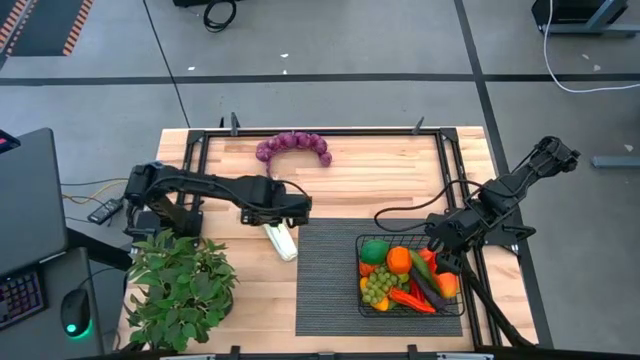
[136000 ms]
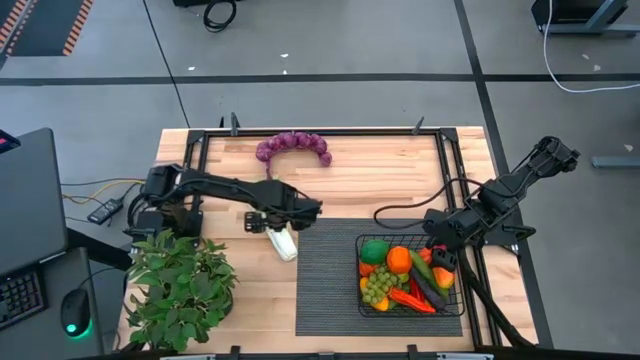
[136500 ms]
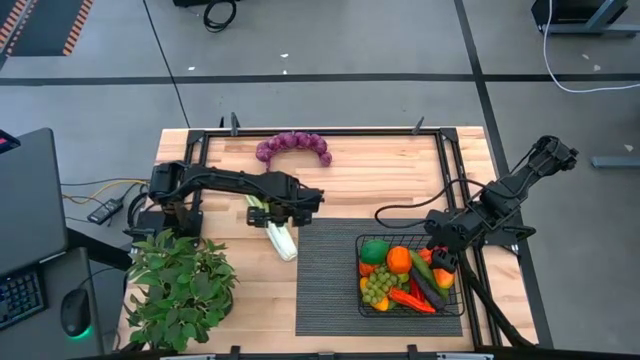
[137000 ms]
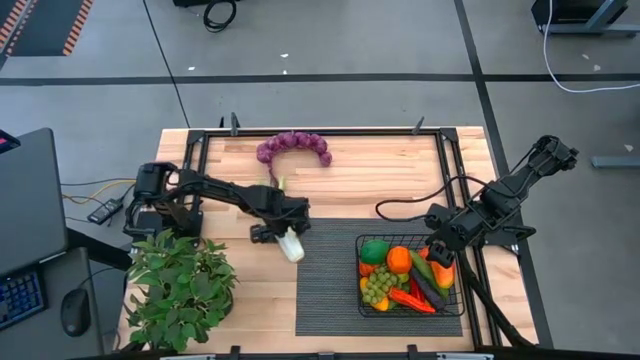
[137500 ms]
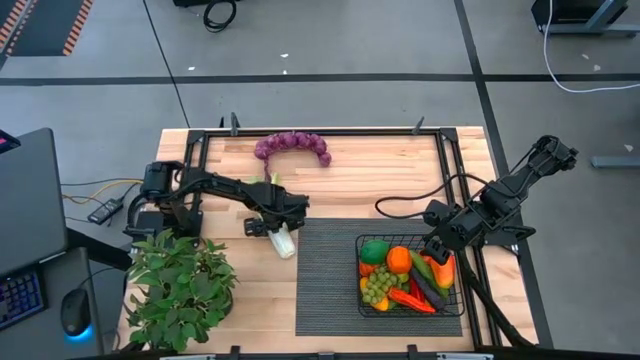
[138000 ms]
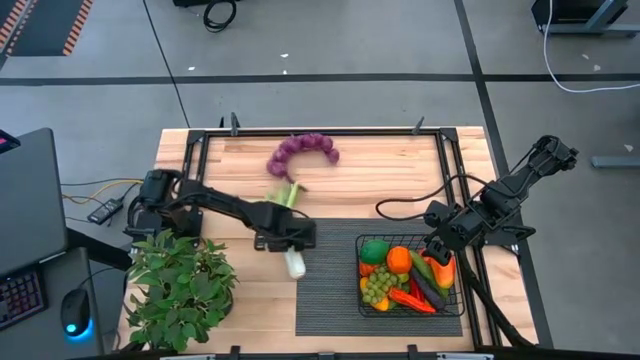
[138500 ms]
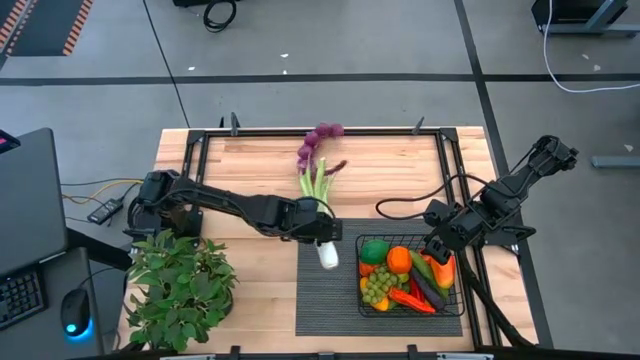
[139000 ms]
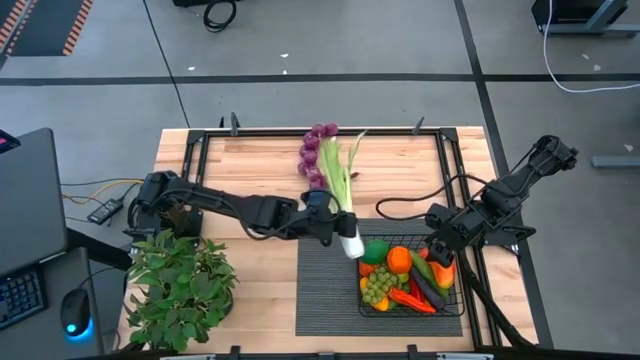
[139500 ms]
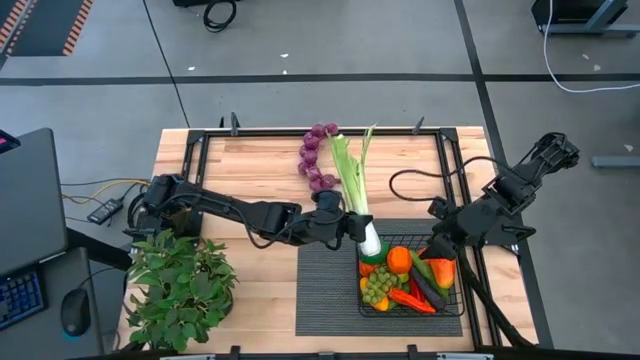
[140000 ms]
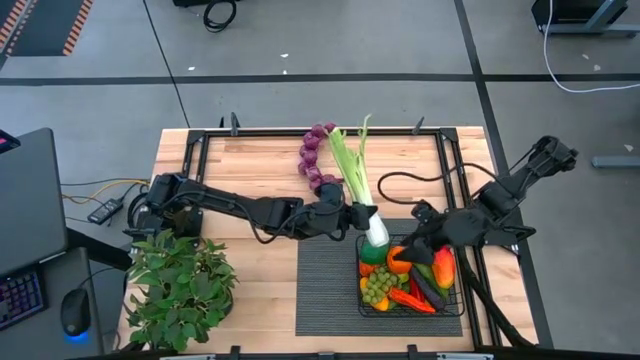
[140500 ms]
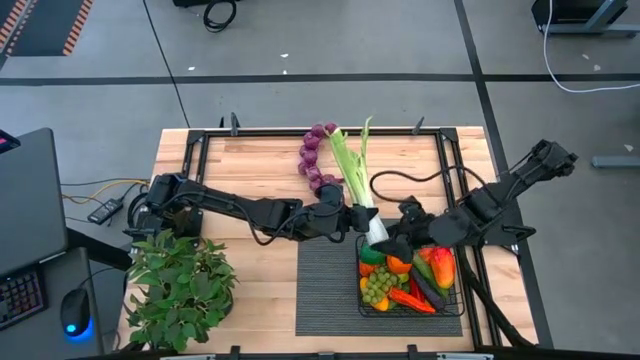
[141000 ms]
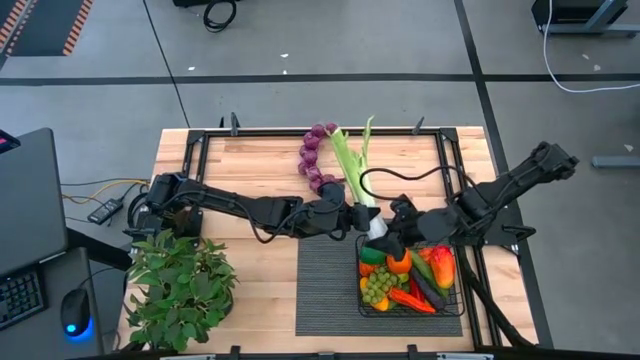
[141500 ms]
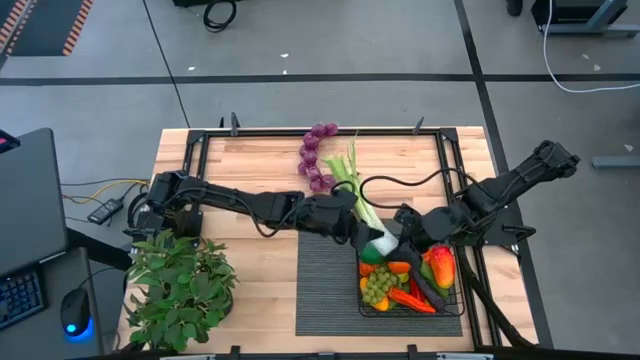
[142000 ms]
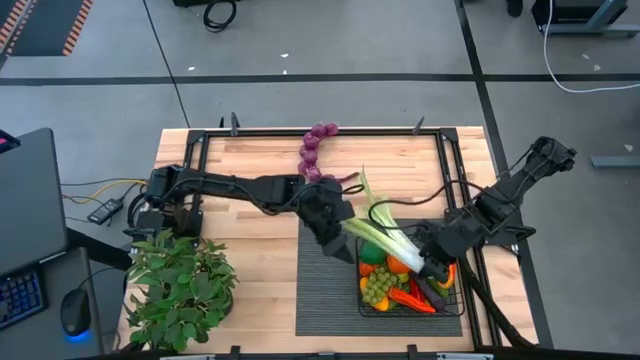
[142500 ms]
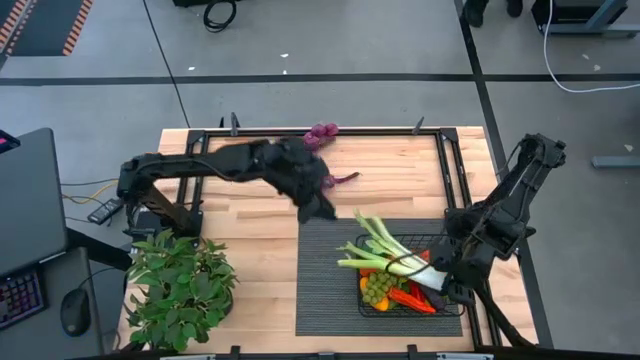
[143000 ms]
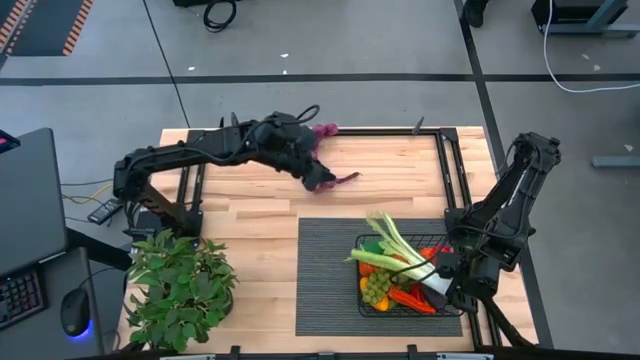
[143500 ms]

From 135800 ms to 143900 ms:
Task: Build produce basket
Put the celery into the wire basket

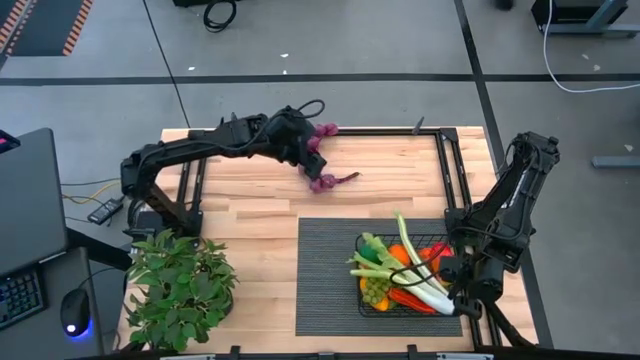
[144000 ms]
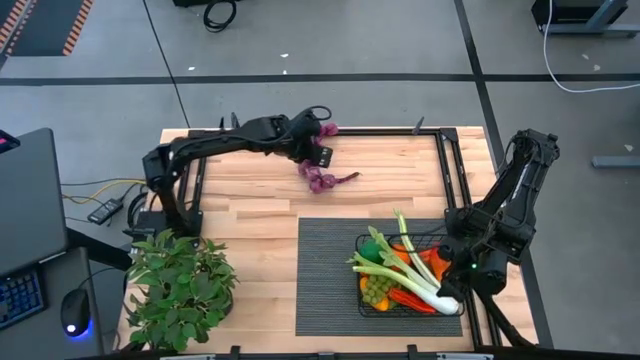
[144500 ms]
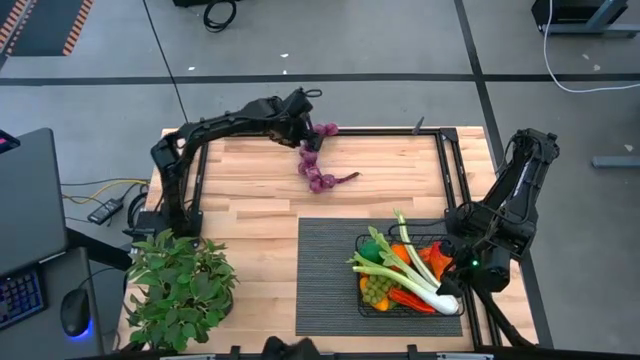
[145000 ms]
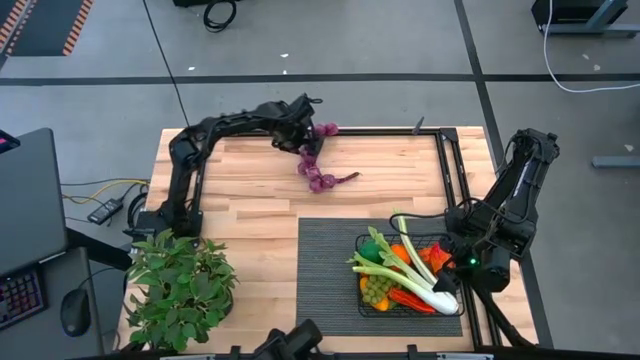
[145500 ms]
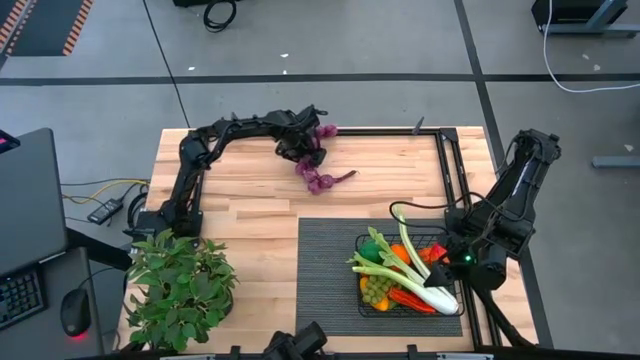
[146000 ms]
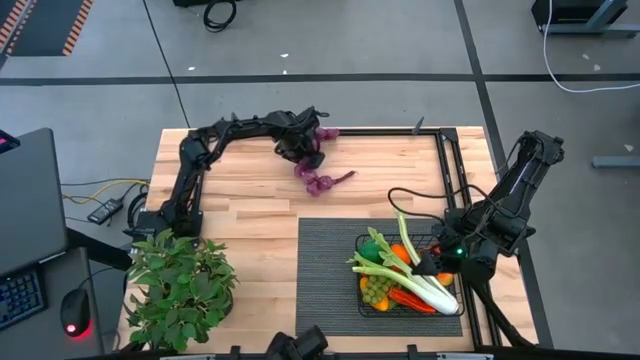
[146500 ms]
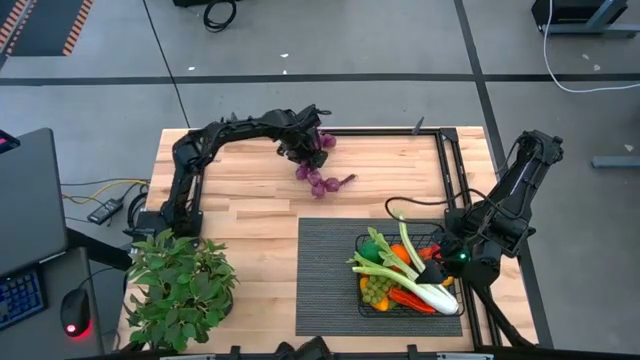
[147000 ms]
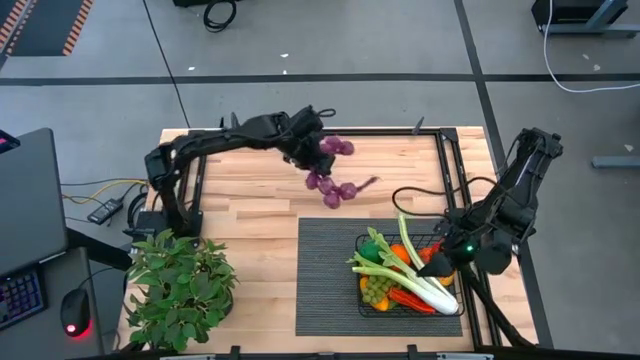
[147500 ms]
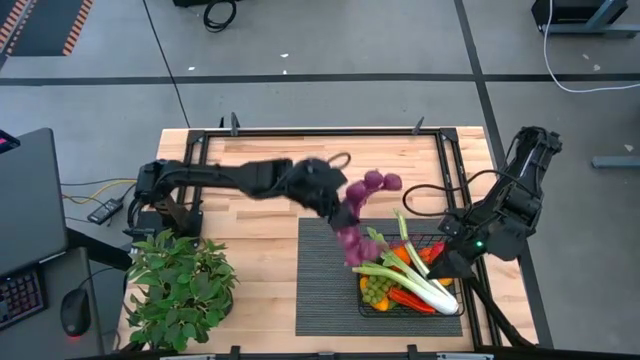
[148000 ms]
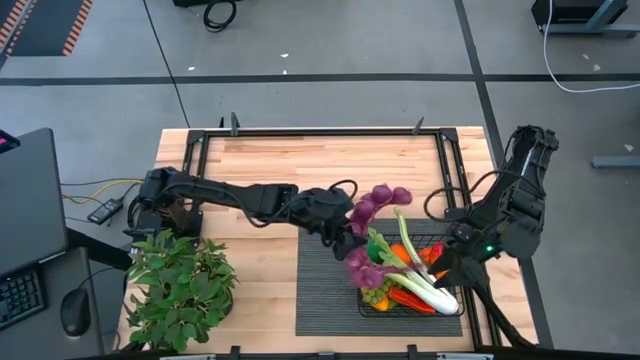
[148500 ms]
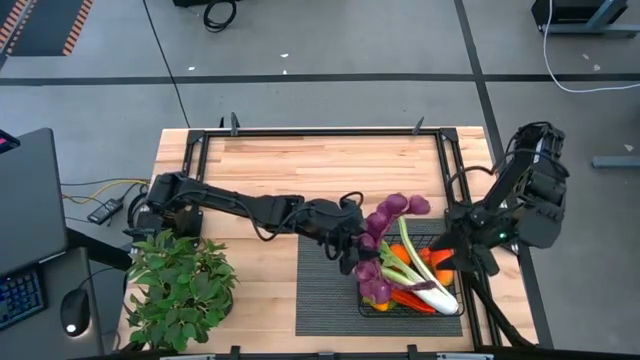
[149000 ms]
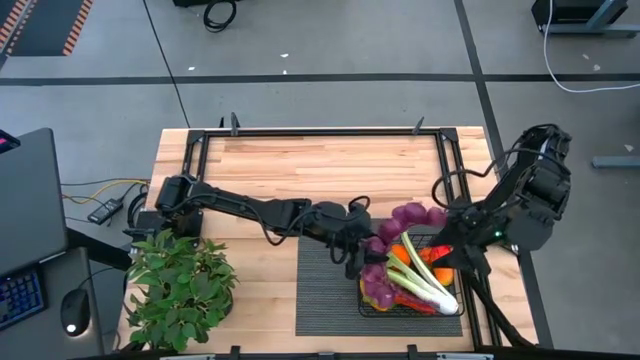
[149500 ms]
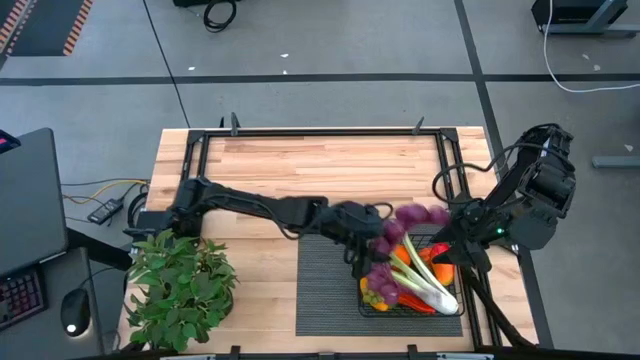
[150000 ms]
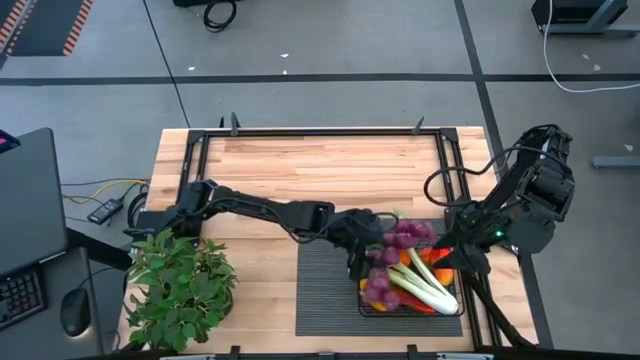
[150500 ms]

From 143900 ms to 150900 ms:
Put the garlic into the wire basket

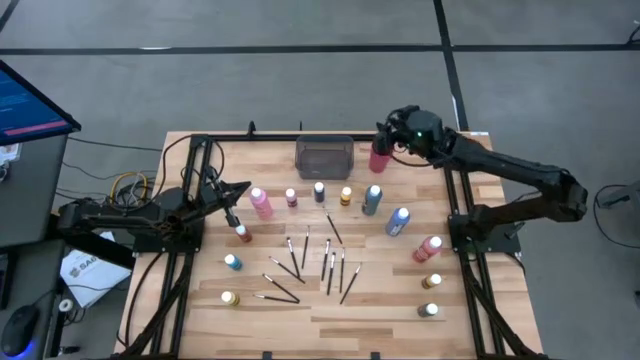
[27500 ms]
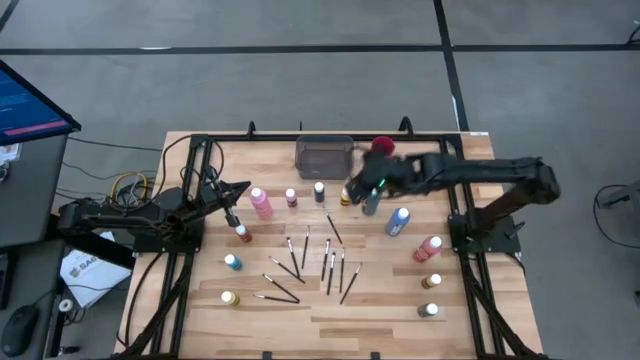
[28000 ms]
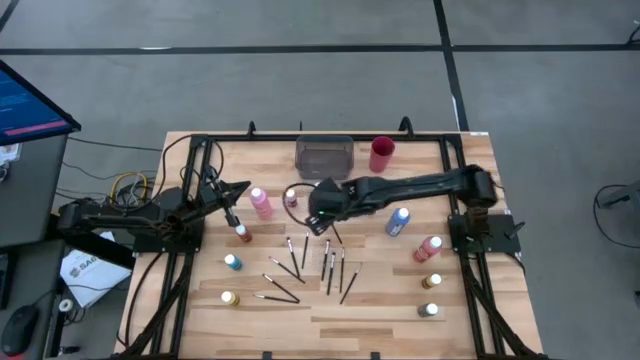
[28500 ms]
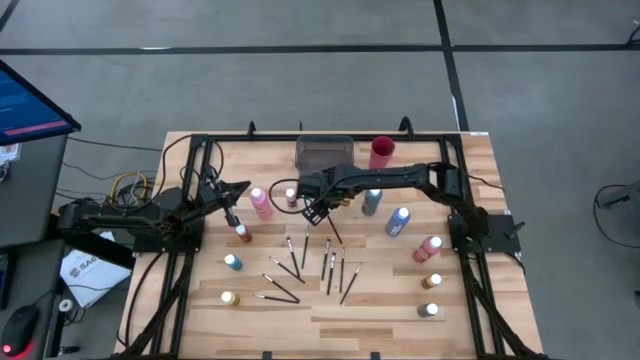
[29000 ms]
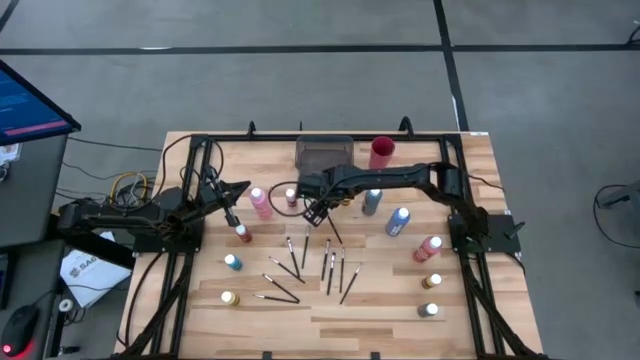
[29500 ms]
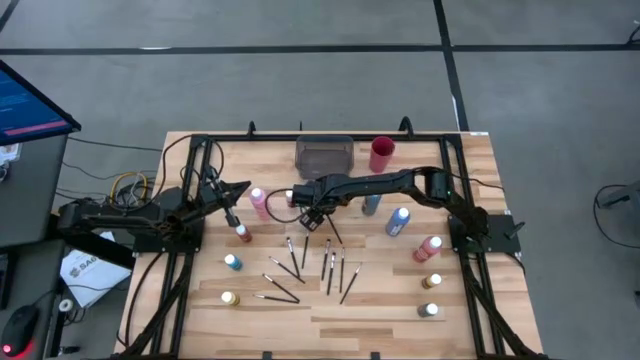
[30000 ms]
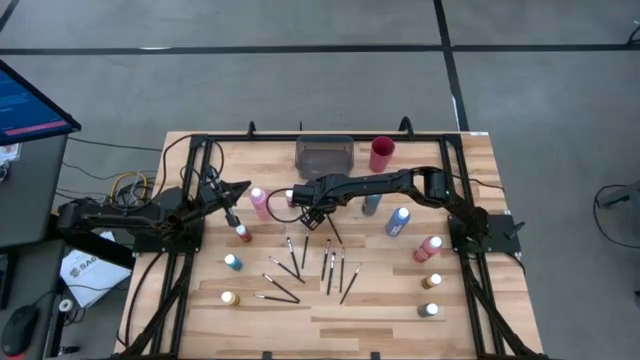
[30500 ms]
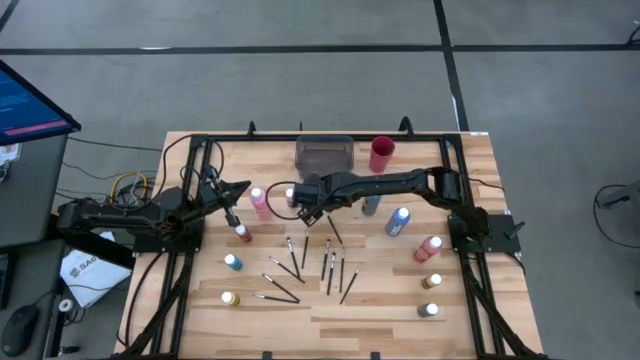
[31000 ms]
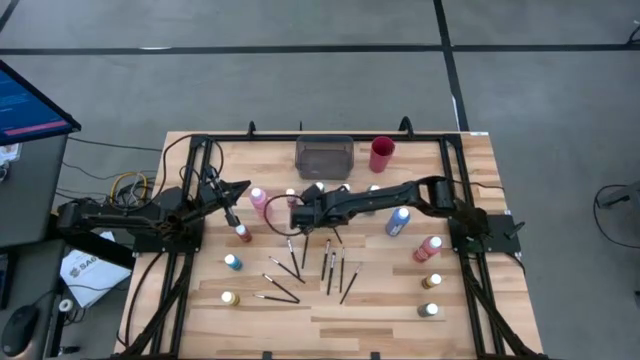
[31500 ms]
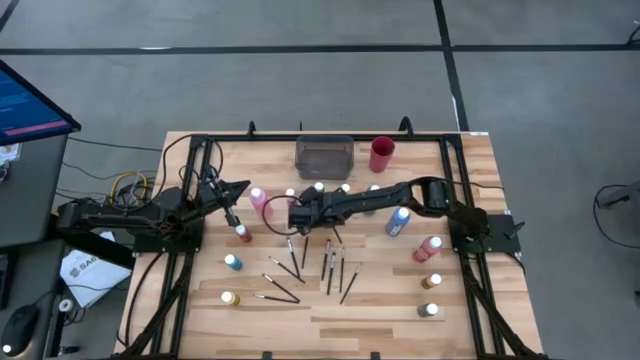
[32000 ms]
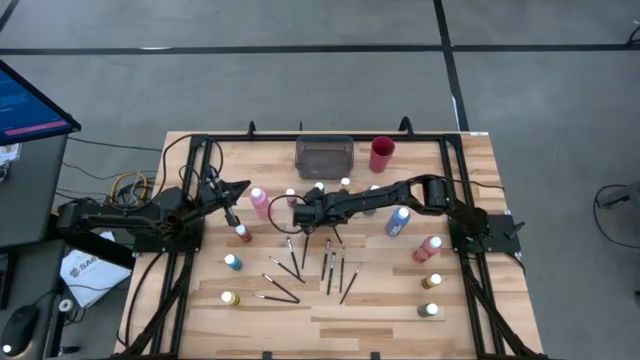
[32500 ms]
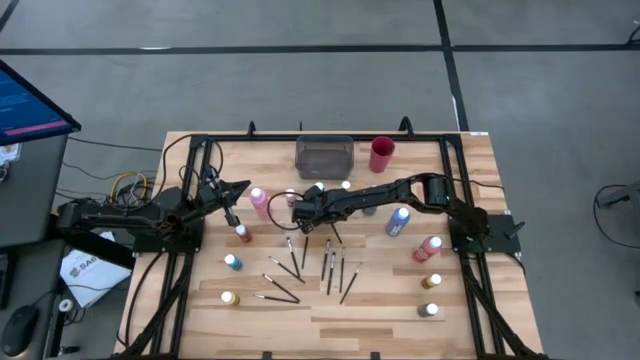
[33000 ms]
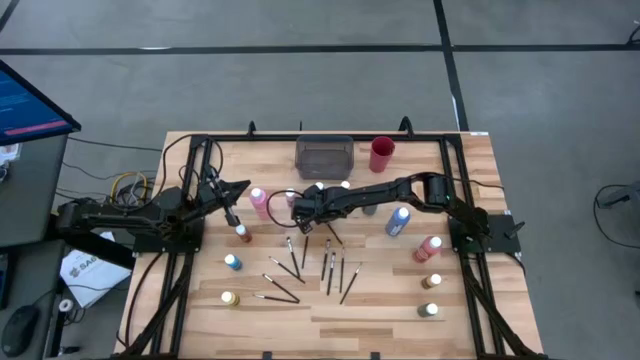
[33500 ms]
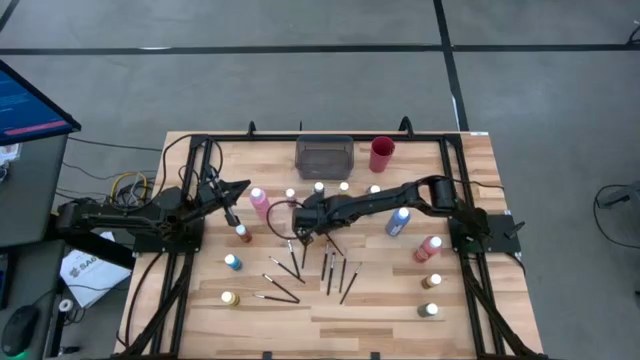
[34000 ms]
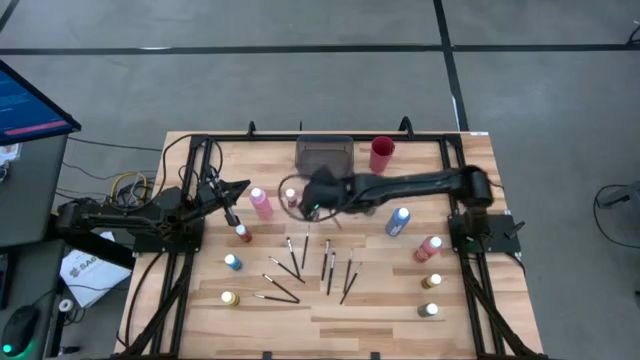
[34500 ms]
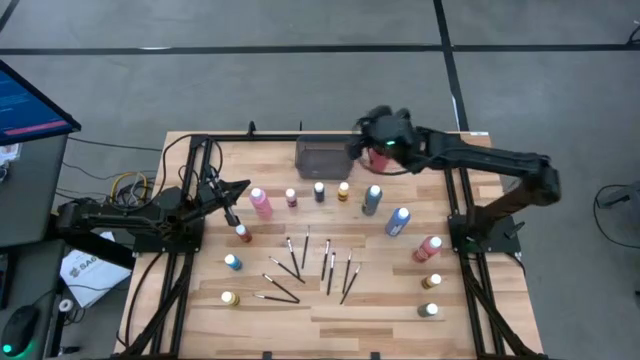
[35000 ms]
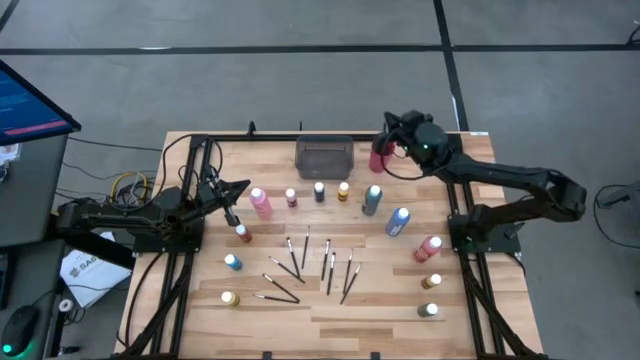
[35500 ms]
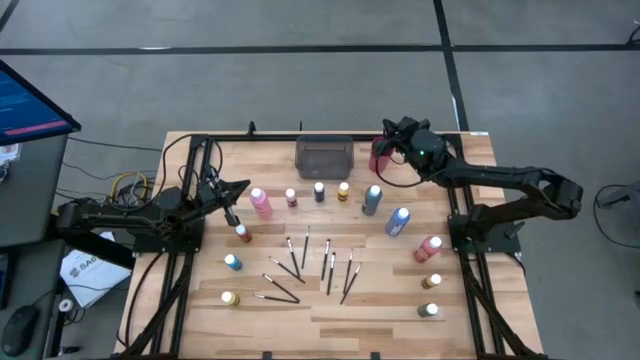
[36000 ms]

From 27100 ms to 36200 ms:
Task: Pick & Place Paint Supplies
Put the black paintbrush into the red cup
